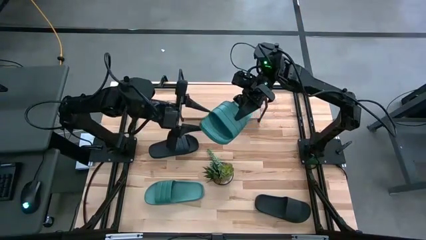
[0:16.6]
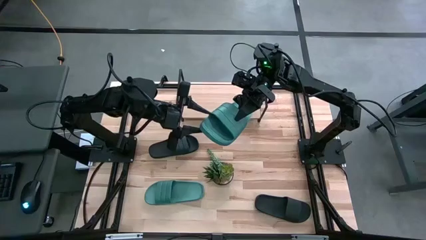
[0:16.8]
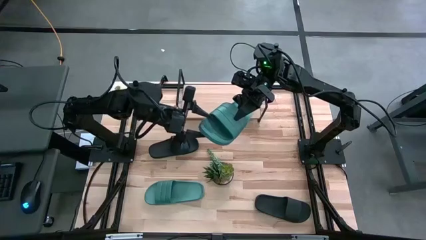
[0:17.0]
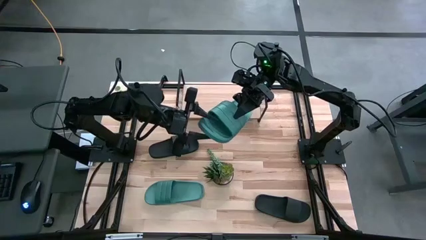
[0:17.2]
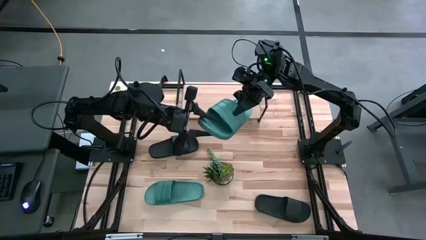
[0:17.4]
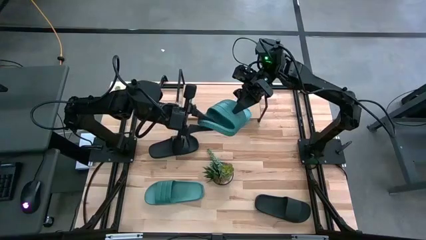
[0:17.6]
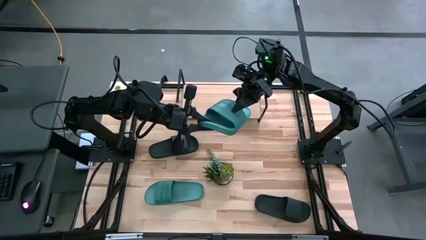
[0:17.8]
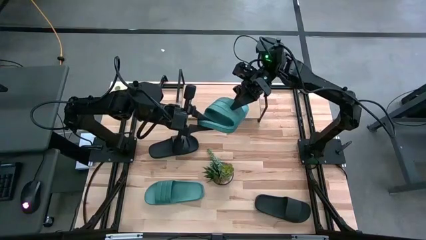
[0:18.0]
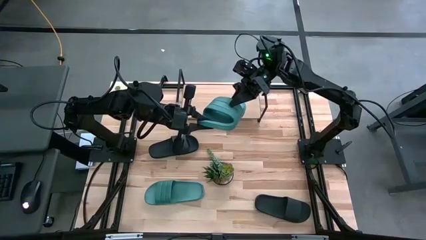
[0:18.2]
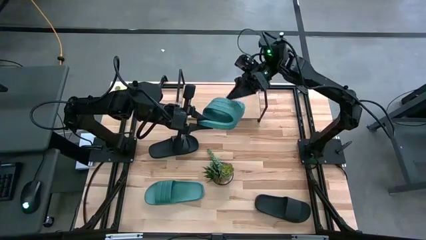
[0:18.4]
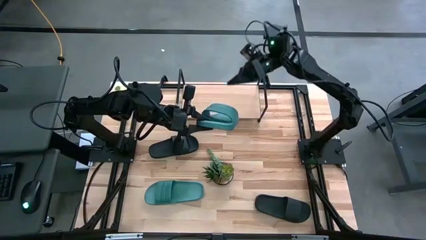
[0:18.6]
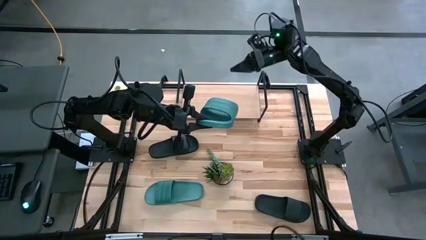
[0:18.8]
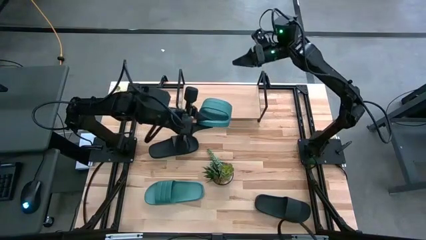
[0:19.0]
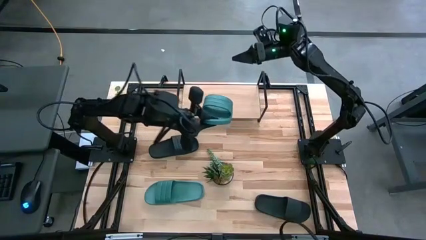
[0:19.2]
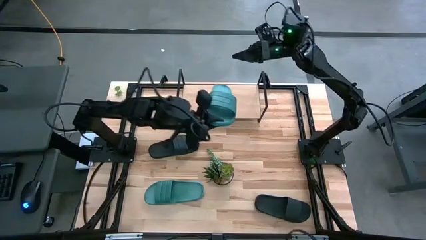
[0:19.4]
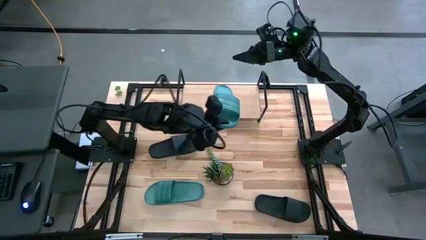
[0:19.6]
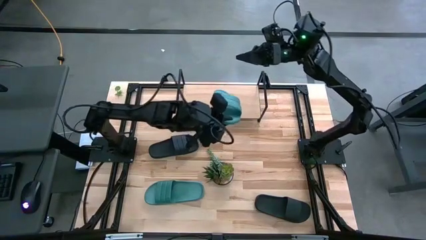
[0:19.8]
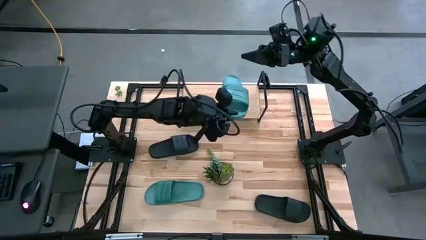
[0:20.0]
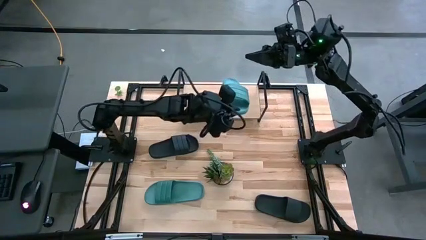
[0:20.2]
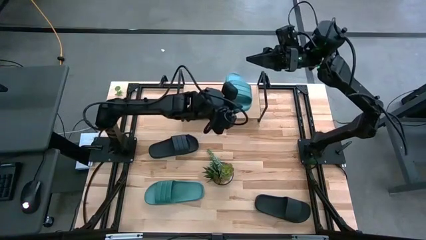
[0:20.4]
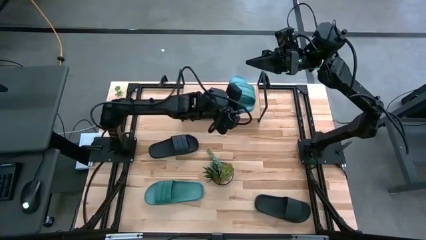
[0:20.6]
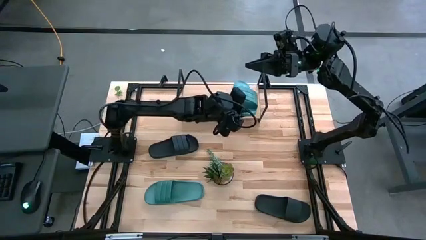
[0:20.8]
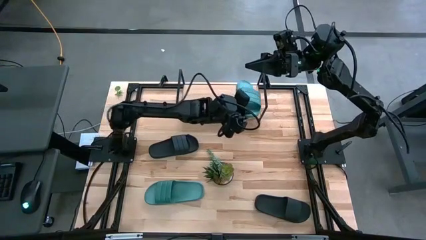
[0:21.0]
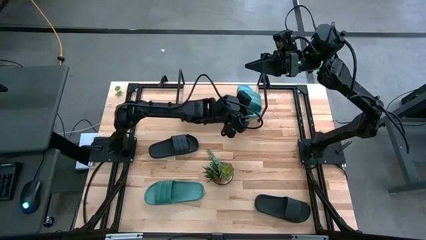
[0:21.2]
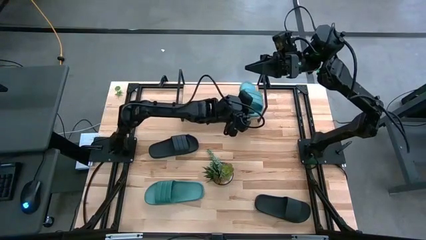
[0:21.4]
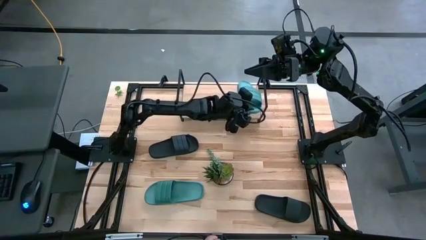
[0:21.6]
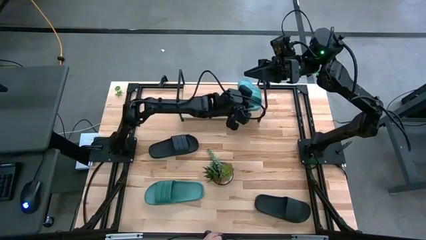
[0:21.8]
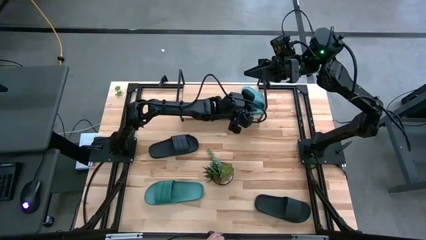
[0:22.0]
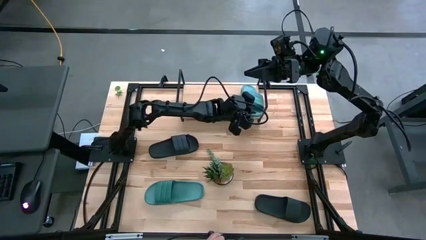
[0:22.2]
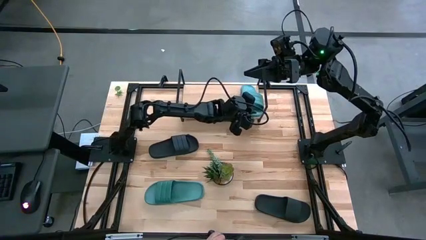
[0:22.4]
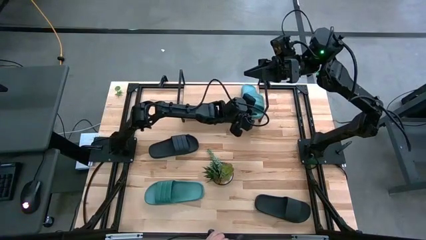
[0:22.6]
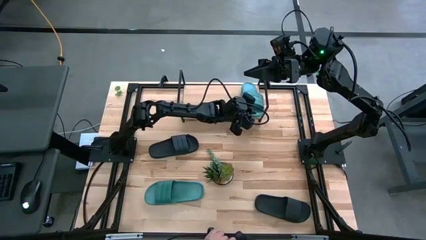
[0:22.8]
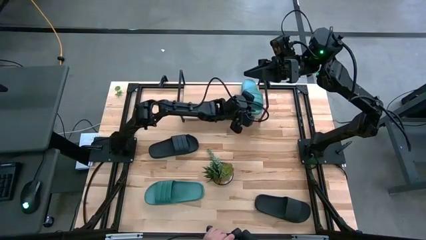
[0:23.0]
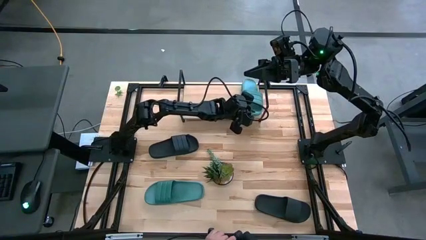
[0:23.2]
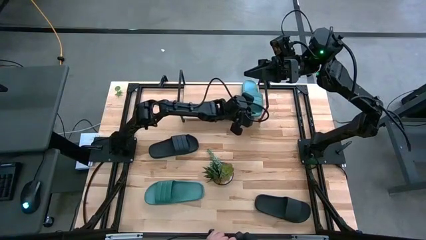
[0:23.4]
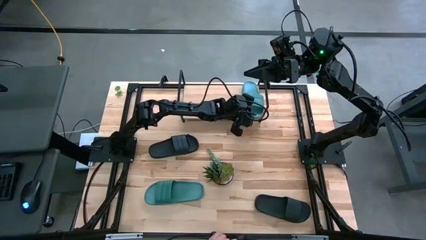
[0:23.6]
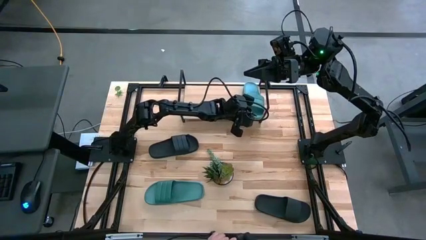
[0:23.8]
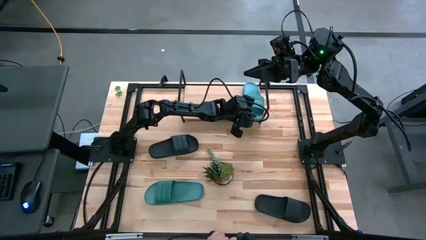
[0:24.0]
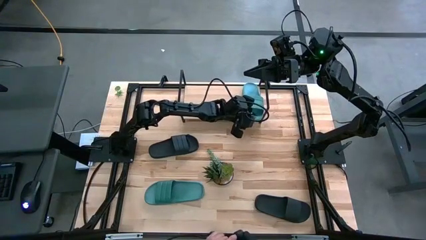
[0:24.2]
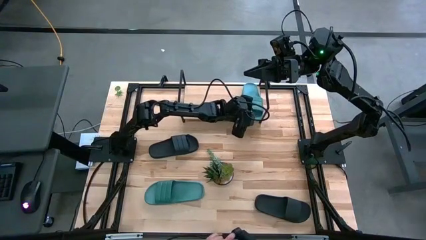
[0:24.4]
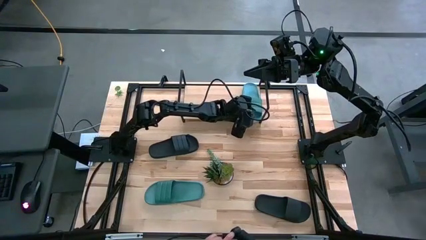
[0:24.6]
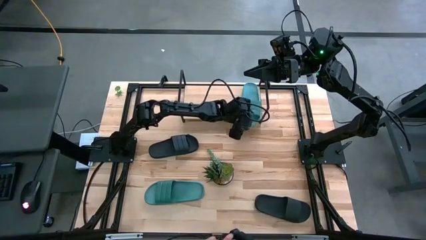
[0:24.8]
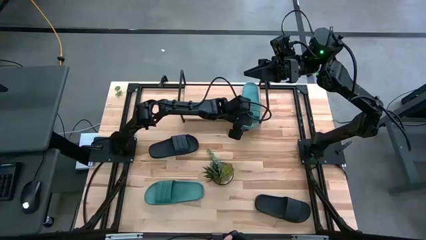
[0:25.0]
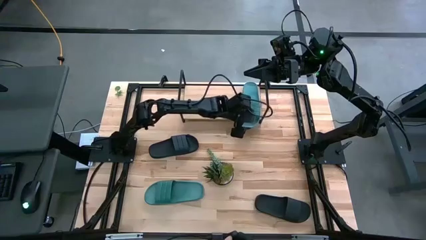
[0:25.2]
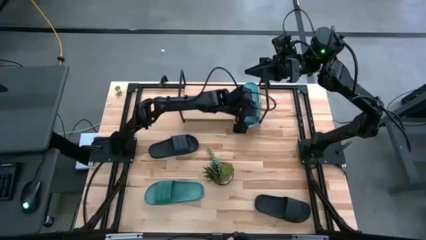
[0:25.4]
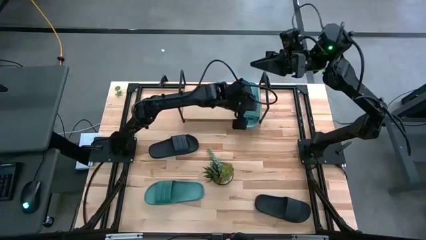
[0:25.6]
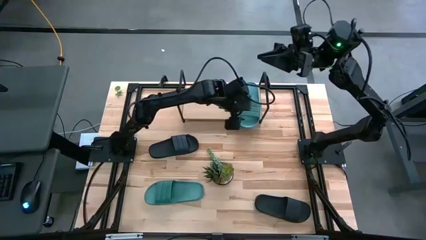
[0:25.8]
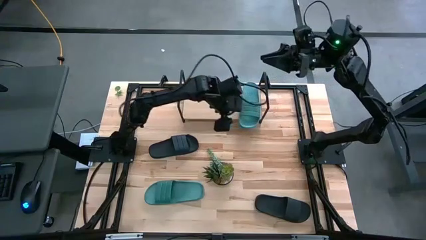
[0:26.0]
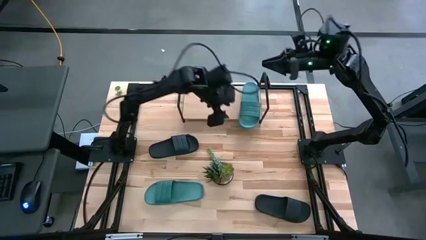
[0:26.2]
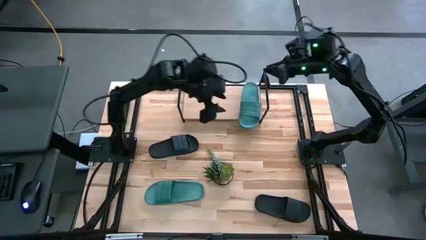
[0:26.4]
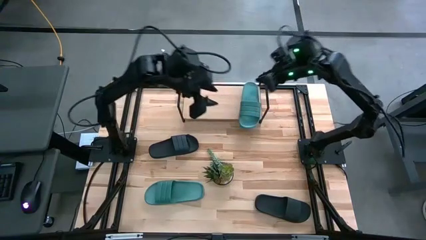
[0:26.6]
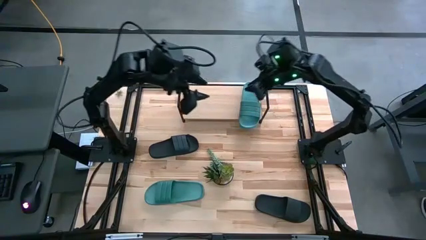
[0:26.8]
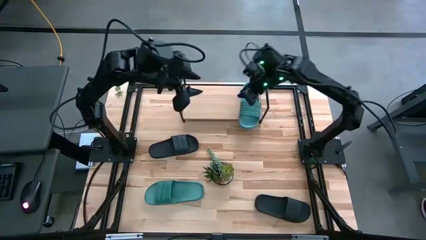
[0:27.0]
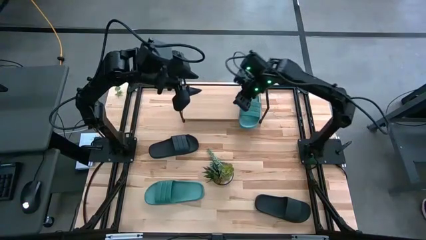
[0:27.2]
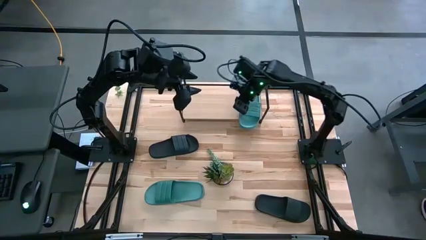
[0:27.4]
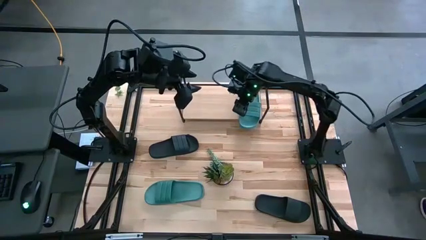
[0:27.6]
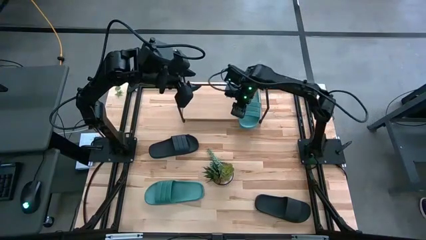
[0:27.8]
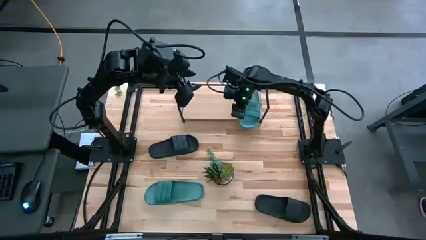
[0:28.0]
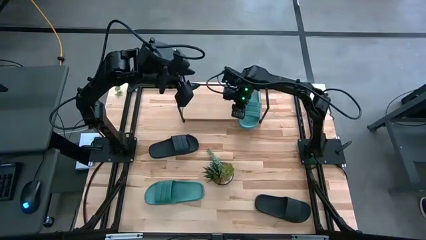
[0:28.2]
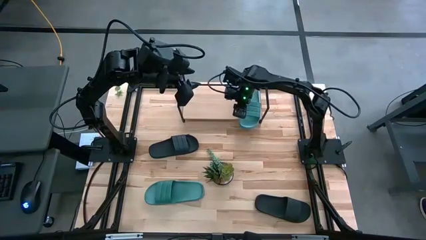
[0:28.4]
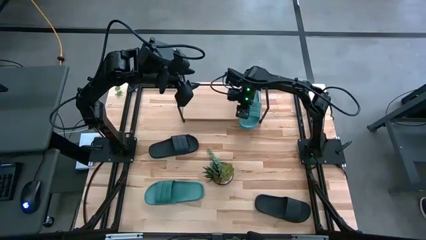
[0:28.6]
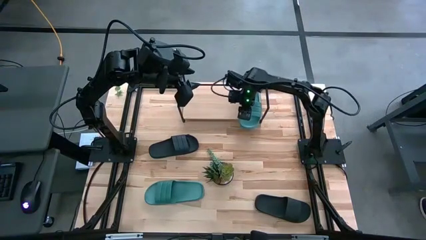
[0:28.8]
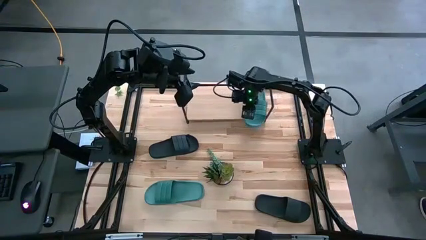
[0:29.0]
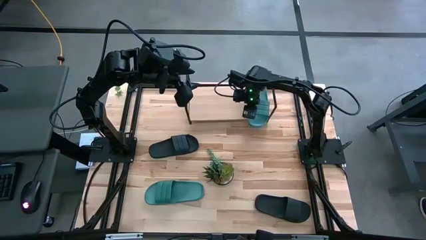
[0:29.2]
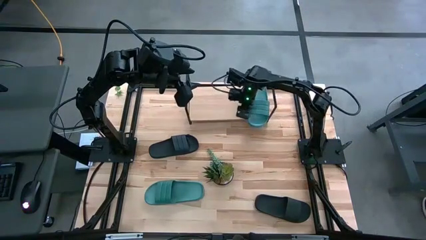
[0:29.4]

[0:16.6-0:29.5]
Task: Pick and place slides into the shelf
Put the right blue slipper on the shelf
